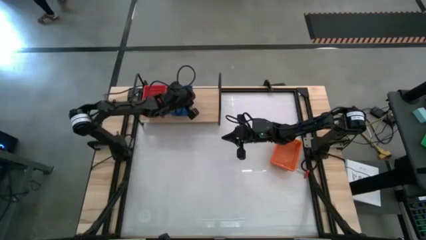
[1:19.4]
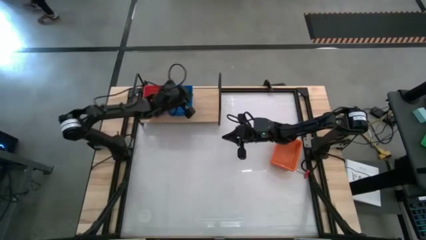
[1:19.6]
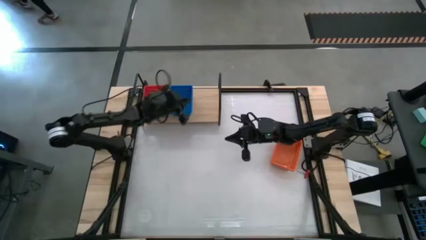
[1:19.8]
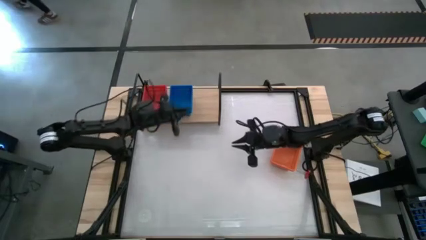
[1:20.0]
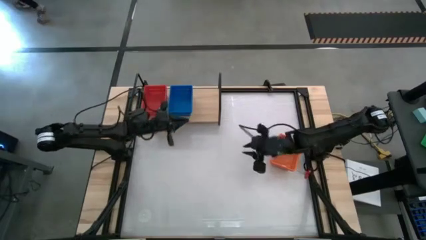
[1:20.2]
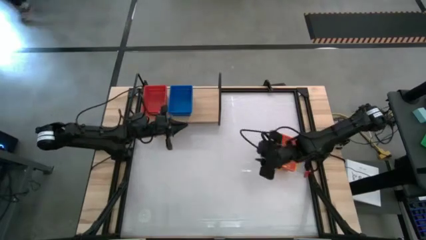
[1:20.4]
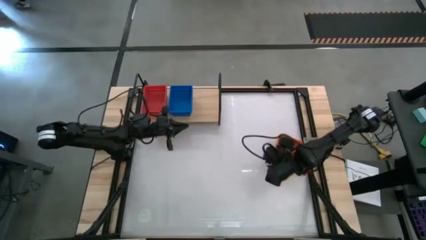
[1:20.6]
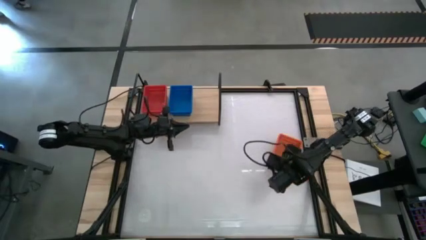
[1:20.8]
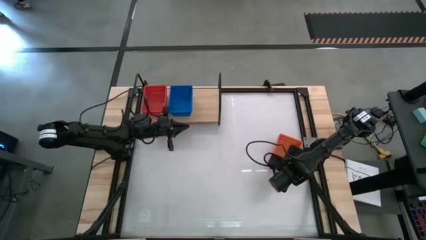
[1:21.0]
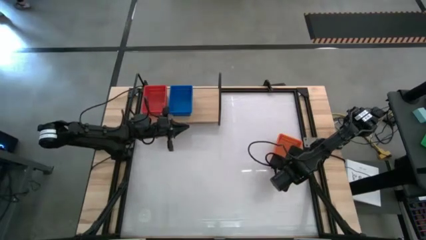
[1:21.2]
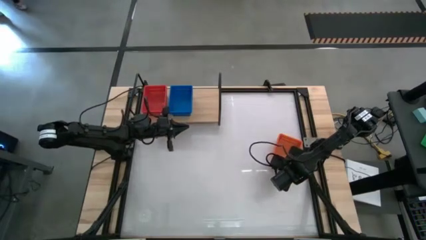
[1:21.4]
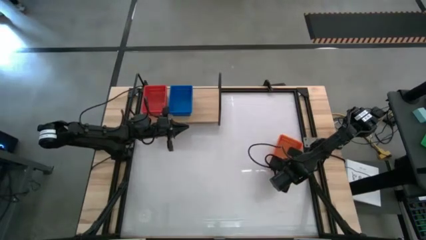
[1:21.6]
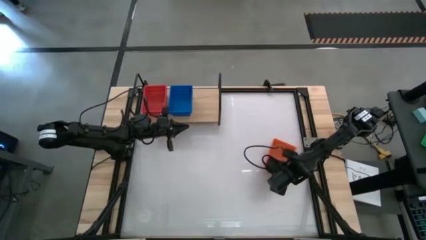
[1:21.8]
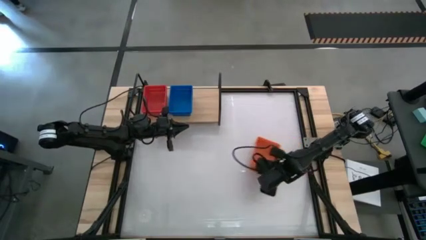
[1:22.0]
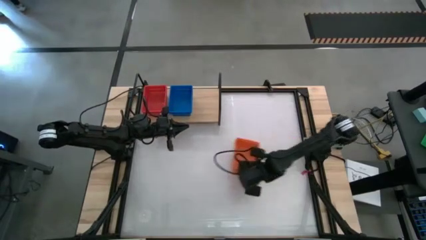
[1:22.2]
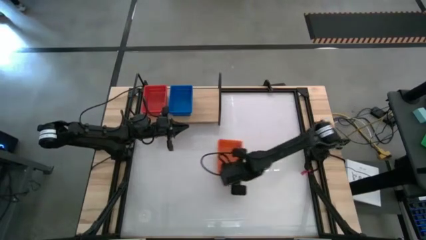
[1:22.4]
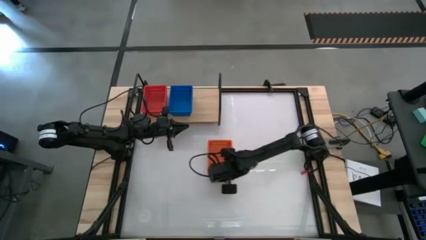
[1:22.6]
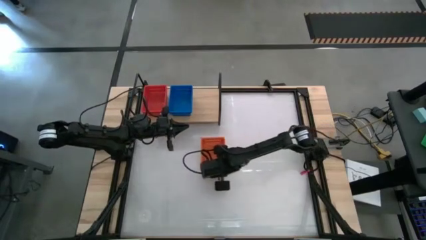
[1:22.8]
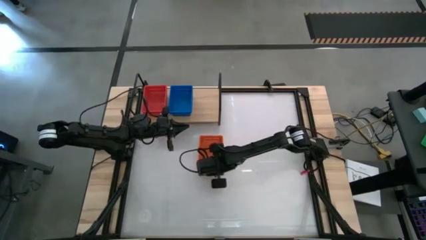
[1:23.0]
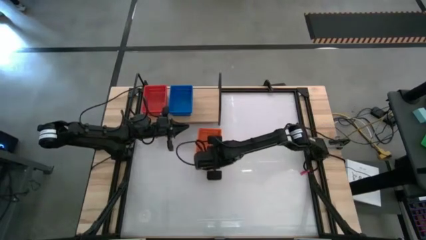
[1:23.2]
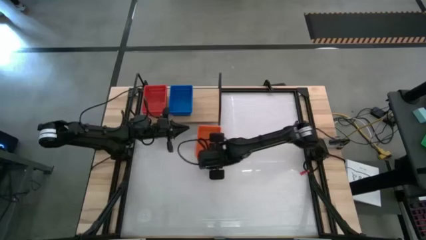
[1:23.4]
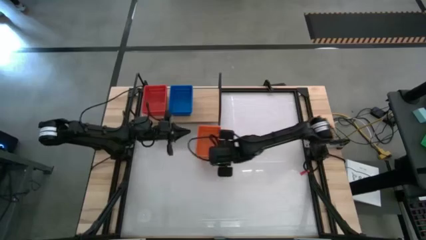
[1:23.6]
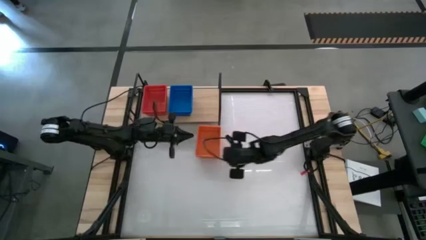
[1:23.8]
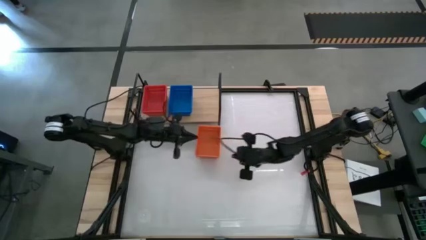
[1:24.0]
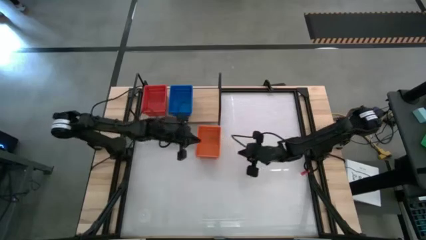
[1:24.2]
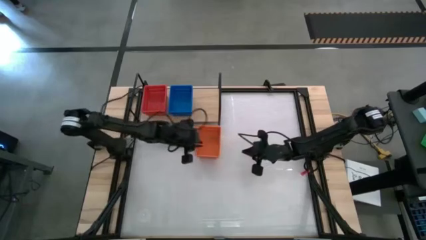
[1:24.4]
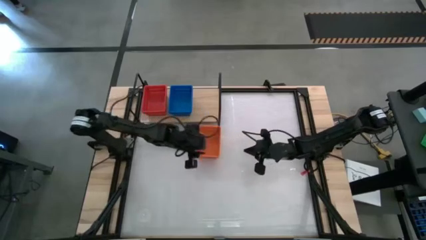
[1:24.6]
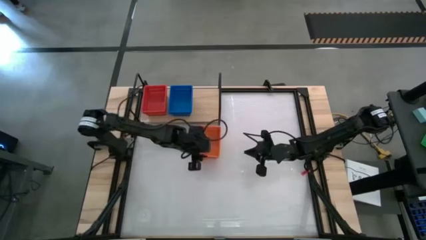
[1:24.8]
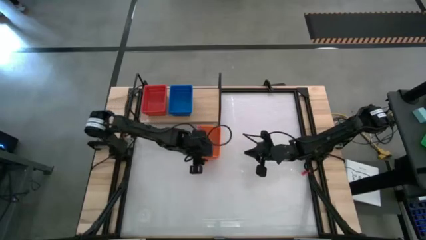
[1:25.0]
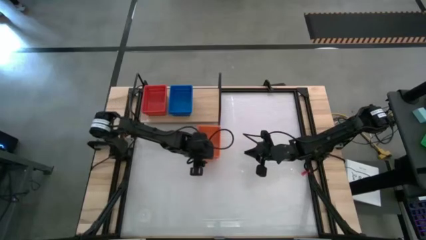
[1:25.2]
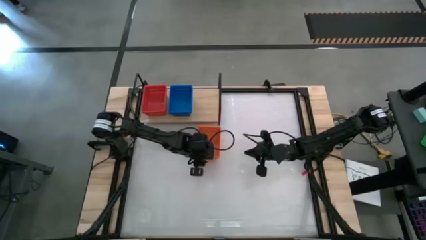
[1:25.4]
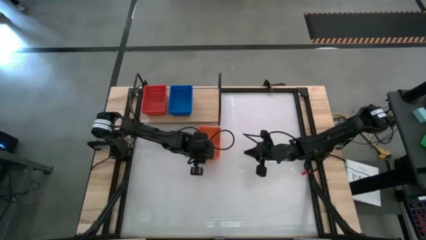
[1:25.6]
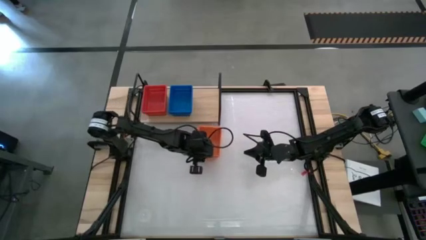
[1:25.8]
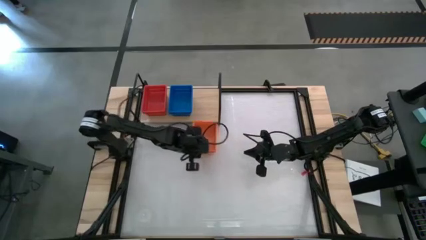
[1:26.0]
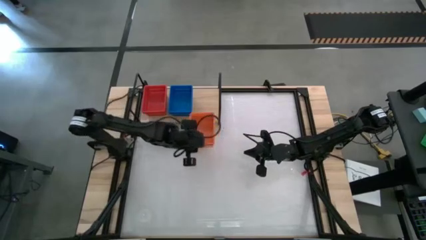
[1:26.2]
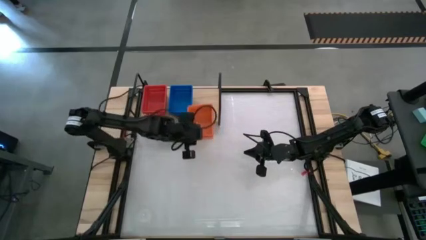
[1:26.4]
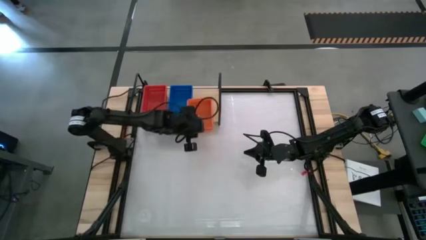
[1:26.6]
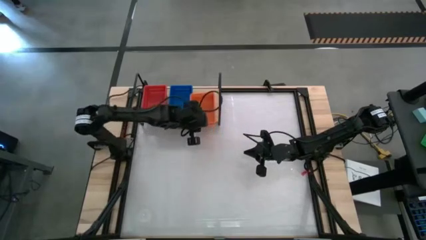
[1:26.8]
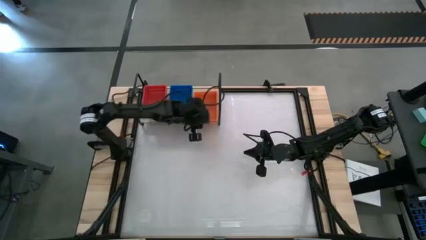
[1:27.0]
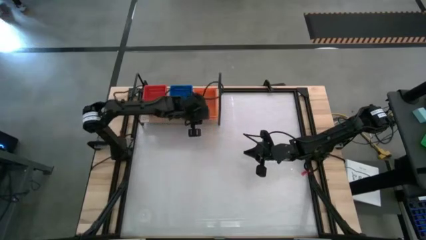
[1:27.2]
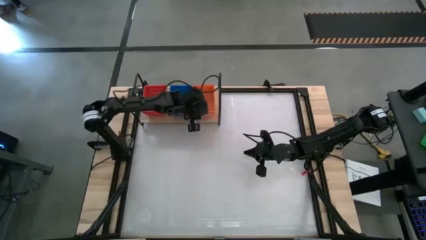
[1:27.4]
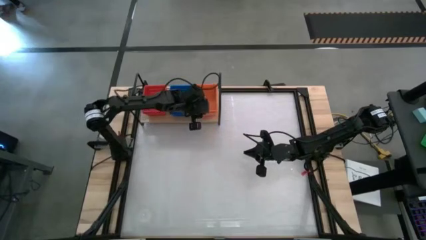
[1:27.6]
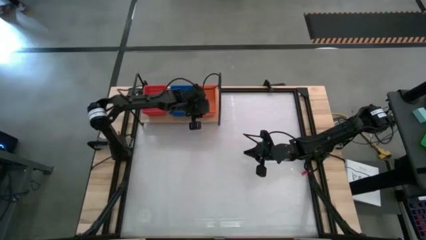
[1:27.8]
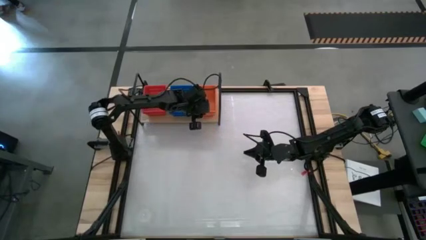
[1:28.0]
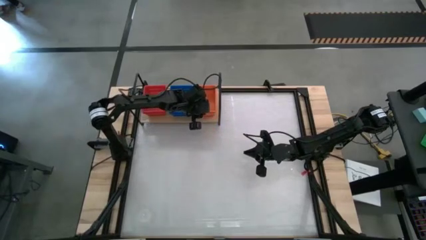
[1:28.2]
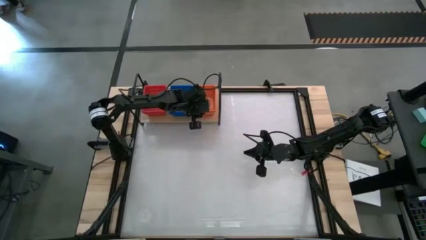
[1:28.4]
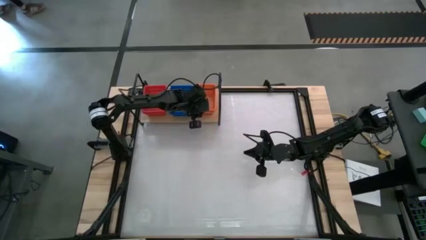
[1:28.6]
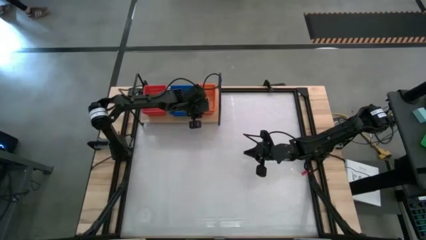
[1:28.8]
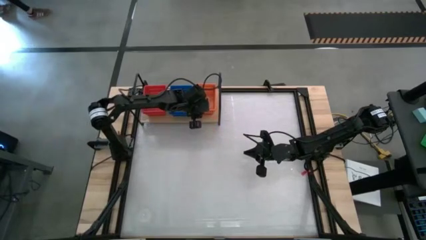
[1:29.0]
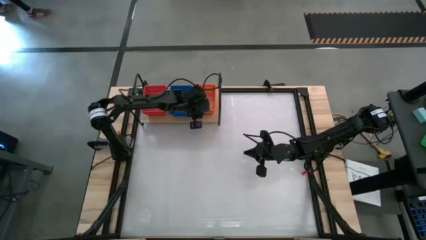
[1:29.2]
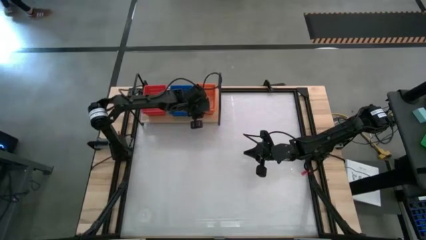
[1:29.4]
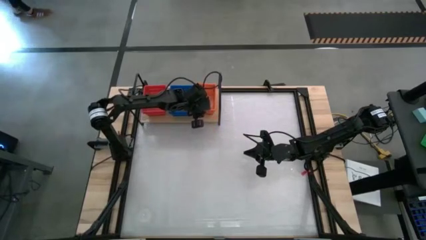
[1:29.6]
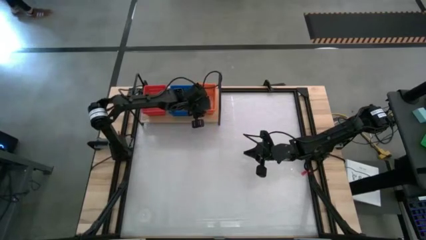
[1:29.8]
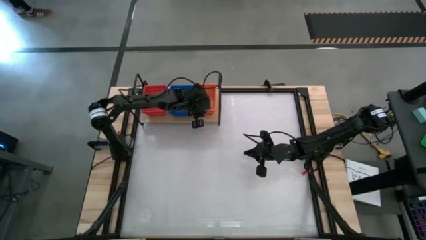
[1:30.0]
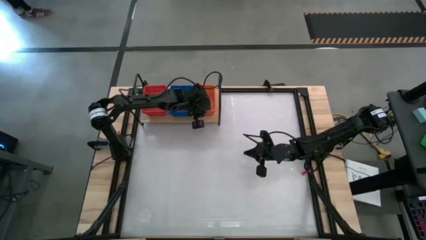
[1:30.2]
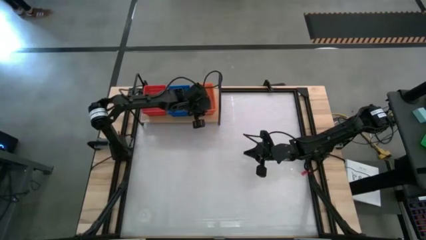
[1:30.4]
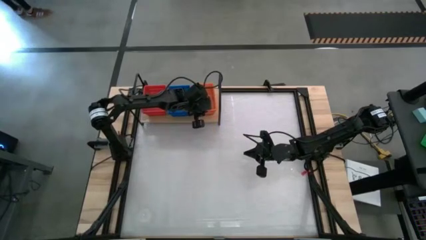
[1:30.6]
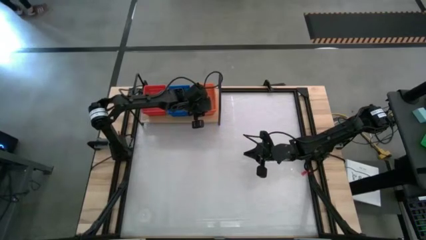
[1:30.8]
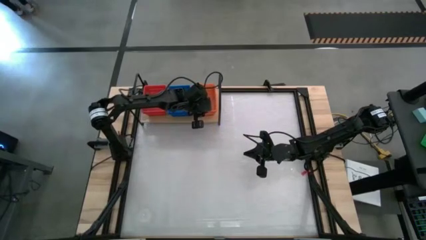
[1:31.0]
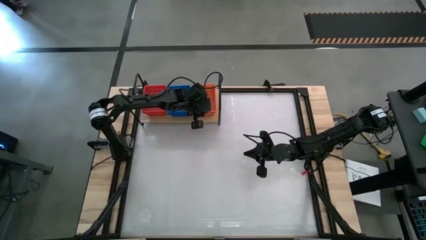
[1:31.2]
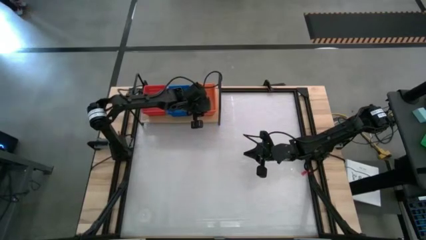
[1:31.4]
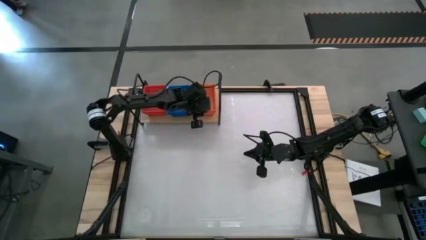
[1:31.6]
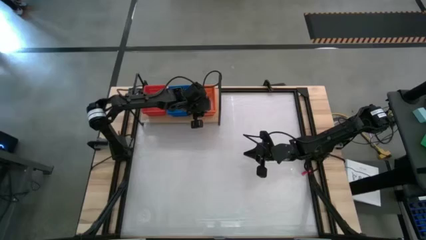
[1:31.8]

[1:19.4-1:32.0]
Task: Stack baskets on shelf by color
Put the stacked orange bins on the shelf

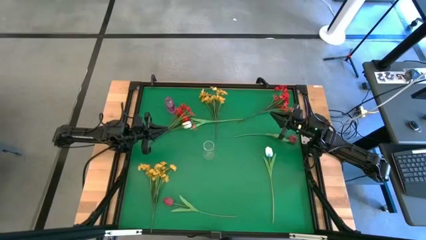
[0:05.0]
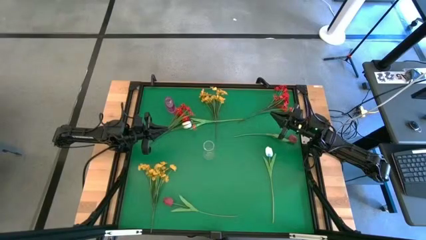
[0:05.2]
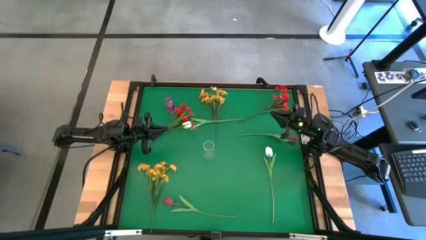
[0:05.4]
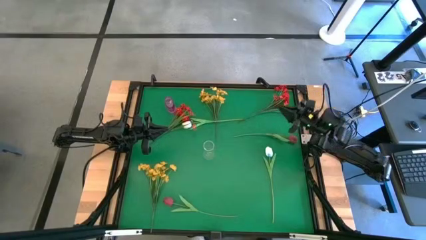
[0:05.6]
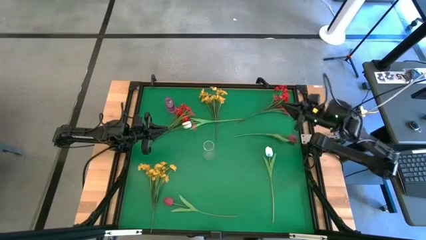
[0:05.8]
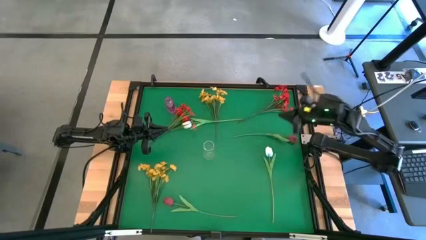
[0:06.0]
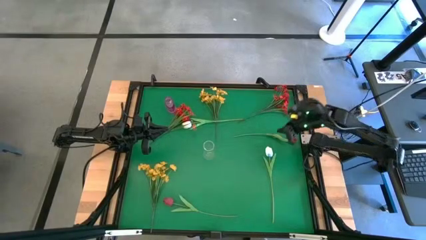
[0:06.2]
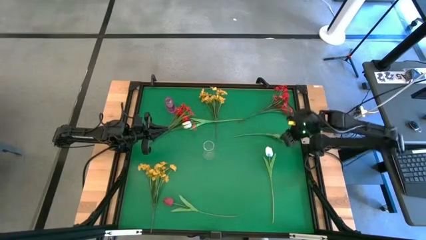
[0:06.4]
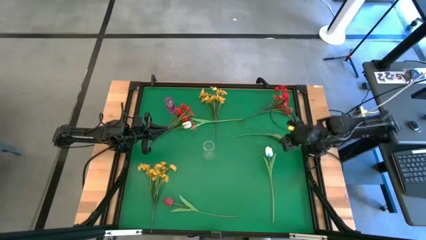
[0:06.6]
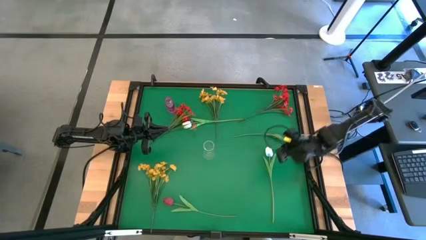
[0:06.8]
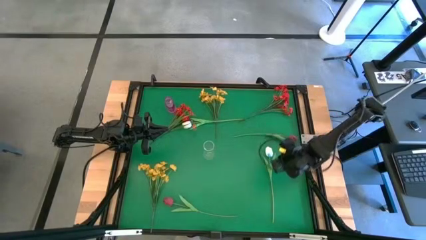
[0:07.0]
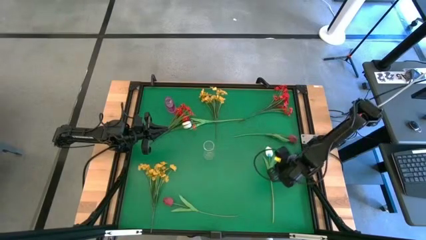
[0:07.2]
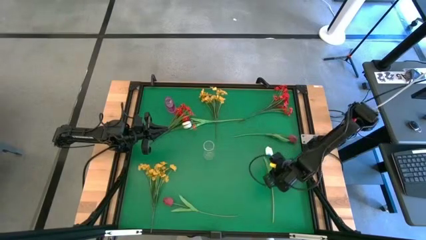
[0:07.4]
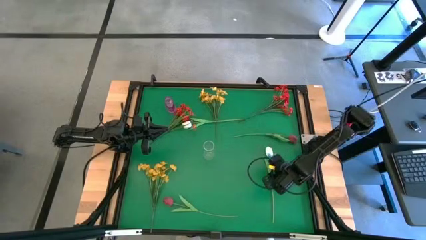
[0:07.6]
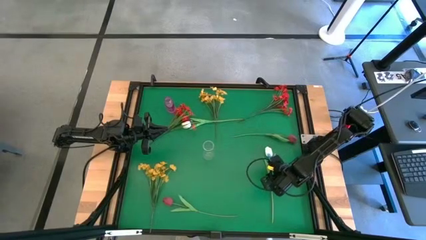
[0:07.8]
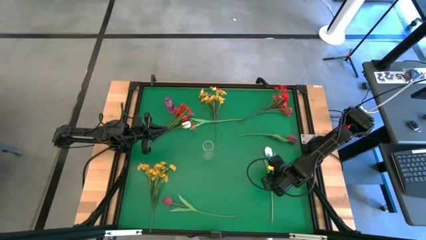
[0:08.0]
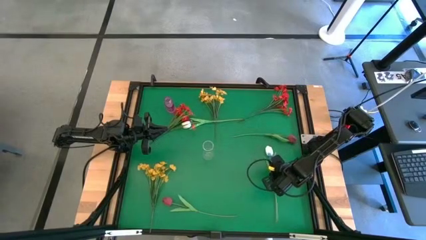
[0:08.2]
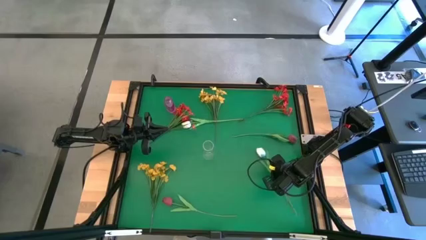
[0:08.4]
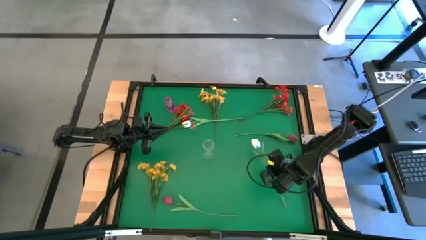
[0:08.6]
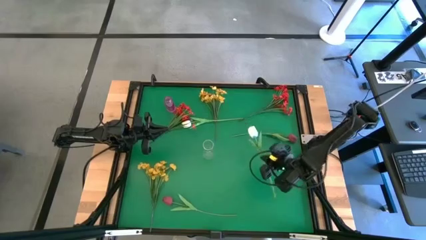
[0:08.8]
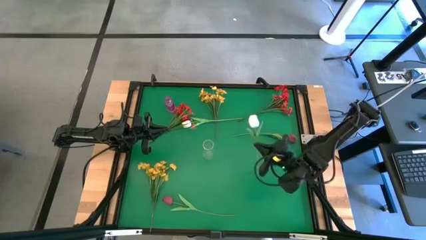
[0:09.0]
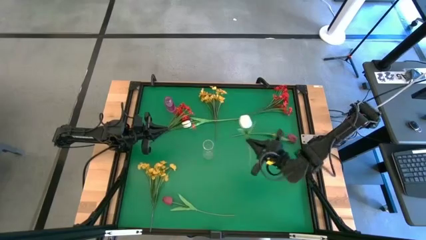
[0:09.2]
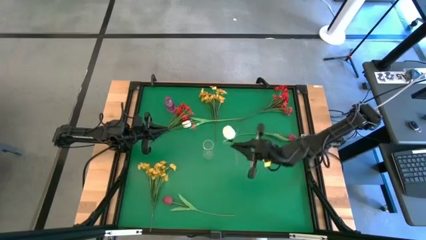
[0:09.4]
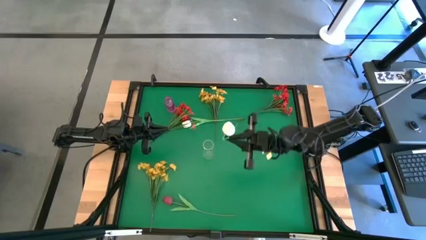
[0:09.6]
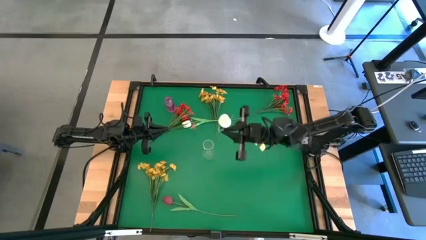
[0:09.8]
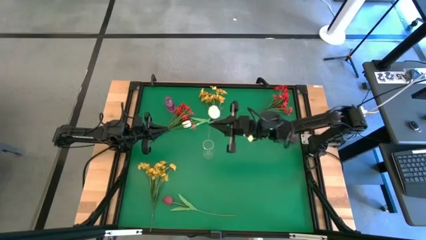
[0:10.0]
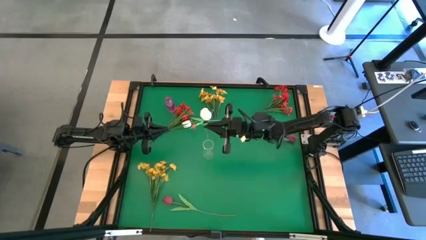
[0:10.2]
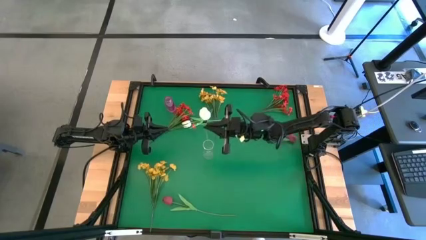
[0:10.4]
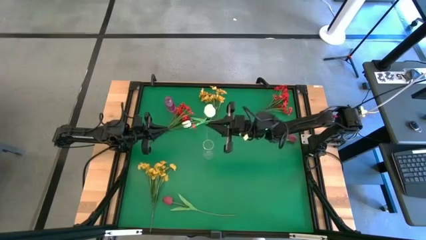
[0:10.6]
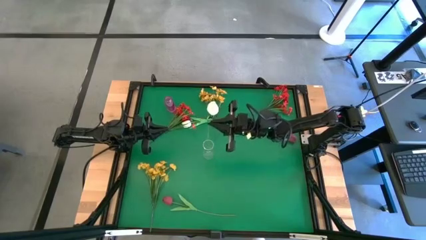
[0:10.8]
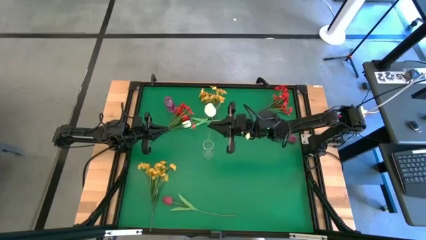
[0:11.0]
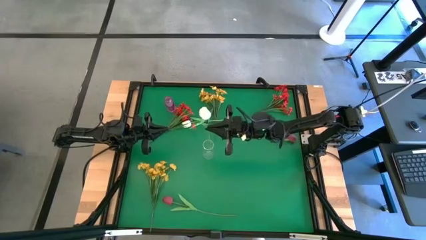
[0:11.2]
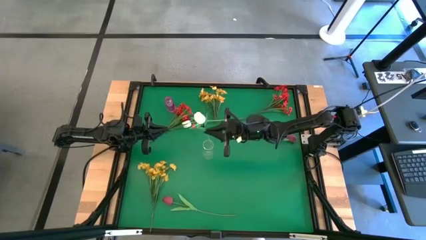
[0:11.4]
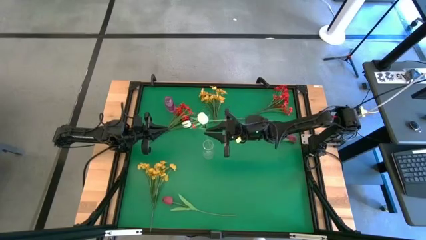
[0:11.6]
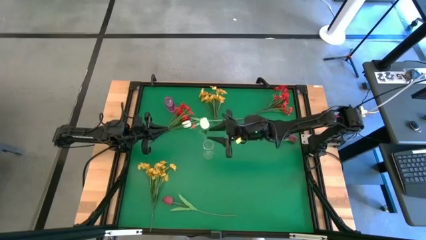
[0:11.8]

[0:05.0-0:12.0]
Task: Sort flowers into vase by color
Put the bottom white tulip into the transparent vase
